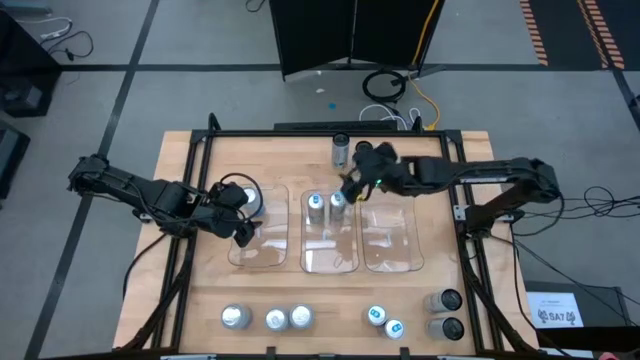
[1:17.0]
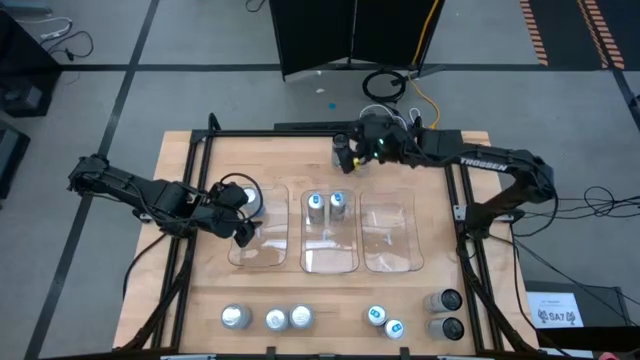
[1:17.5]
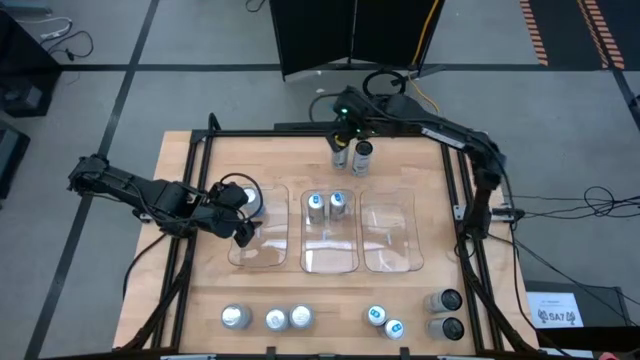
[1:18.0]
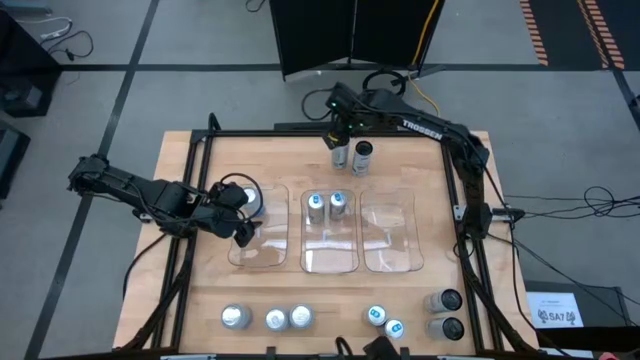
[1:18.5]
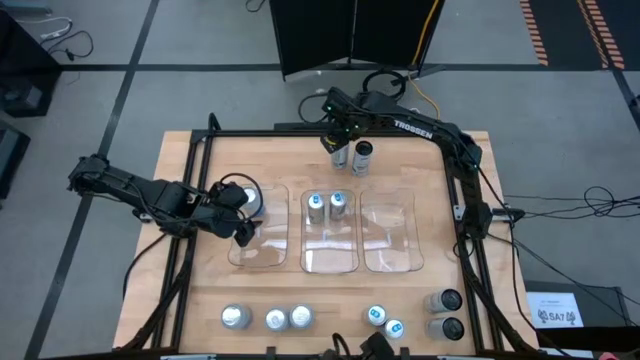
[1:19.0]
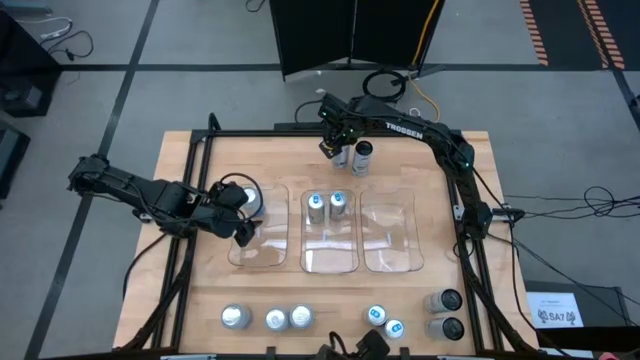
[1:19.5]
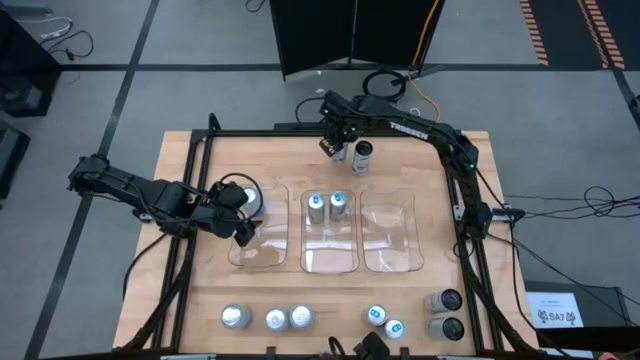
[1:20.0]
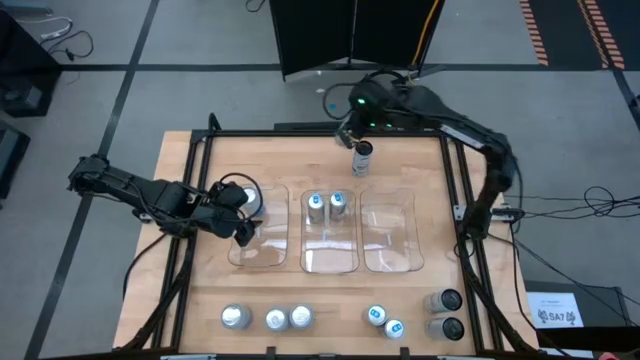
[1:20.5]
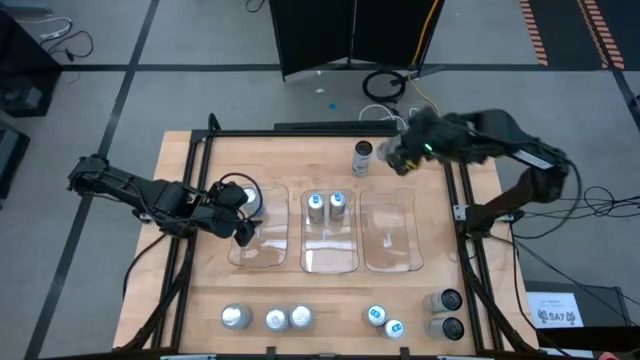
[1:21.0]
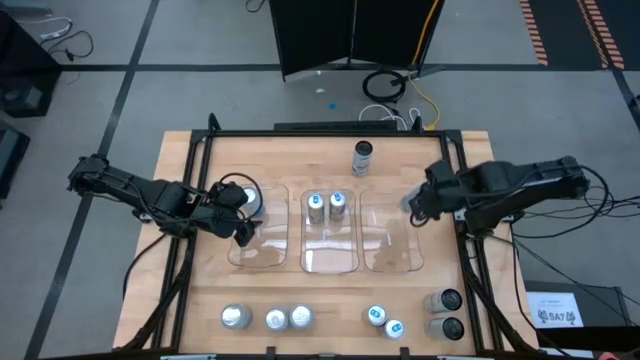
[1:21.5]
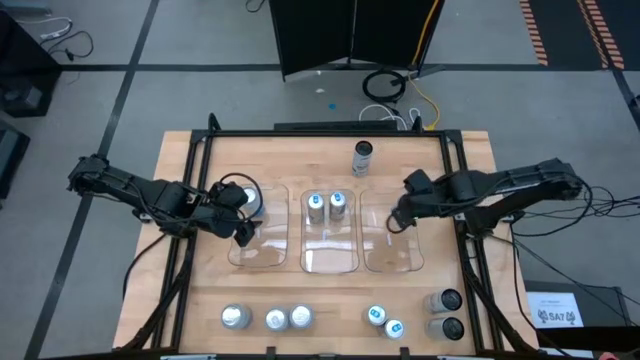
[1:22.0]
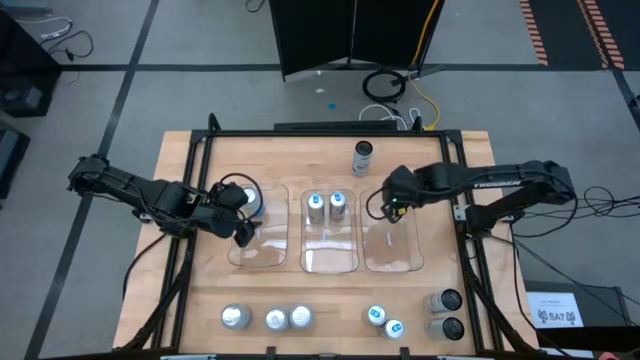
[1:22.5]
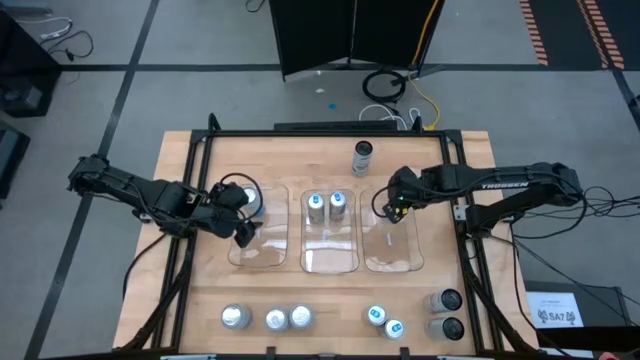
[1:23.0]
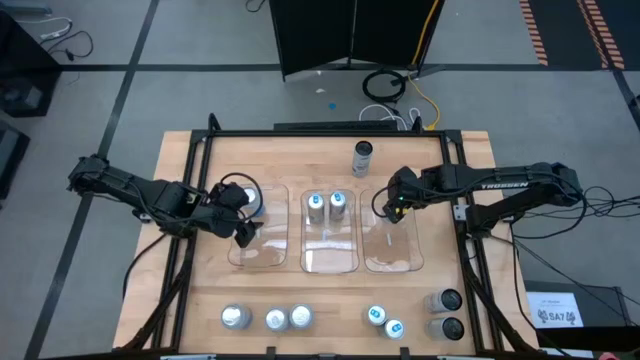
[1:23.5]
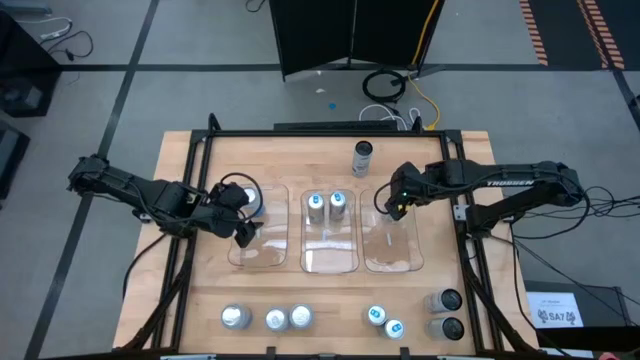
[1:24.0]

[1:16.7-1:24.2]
Task: Sort soda cans
Put the top white-blue soda can into the right transparent bin

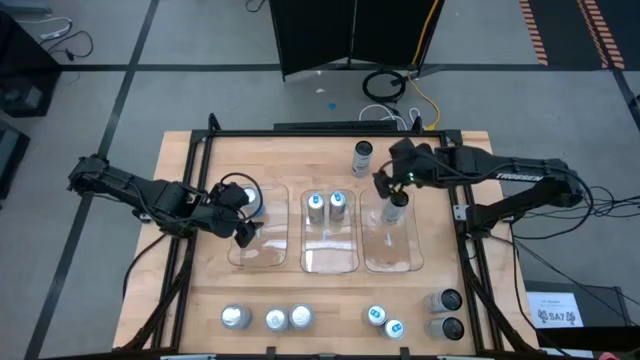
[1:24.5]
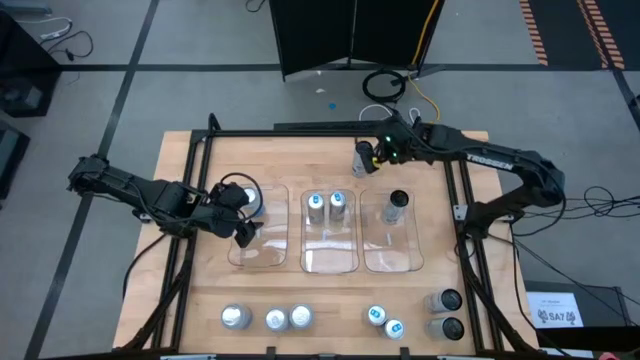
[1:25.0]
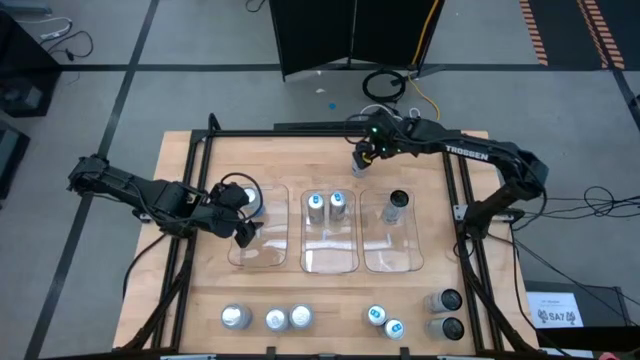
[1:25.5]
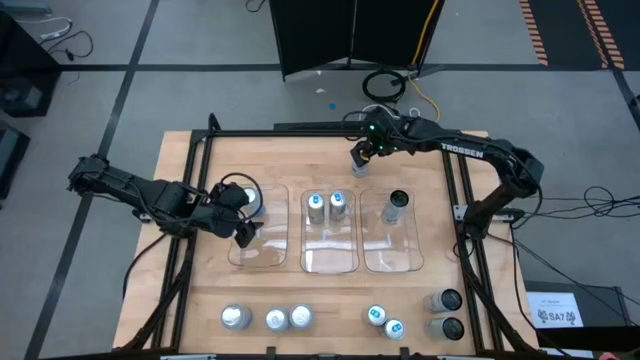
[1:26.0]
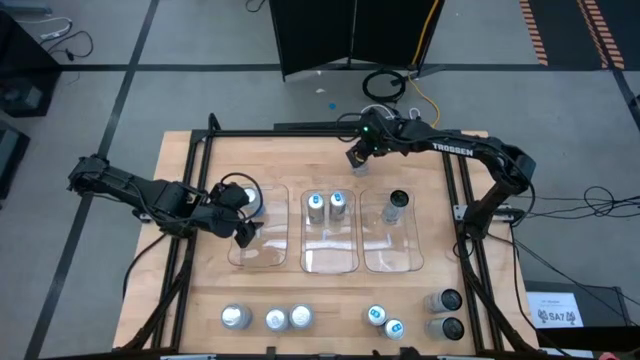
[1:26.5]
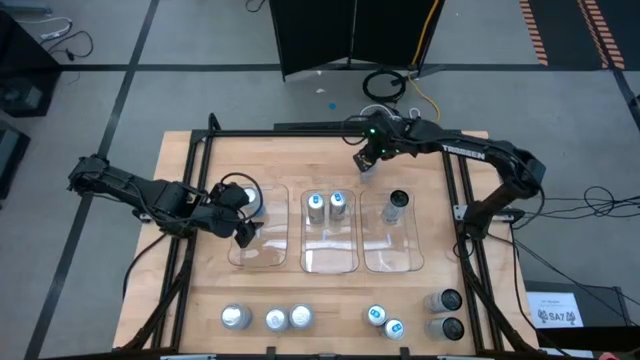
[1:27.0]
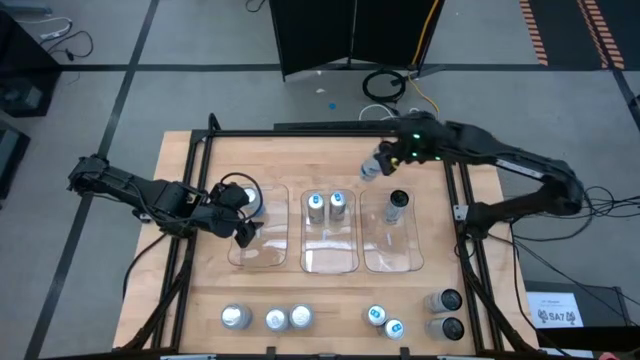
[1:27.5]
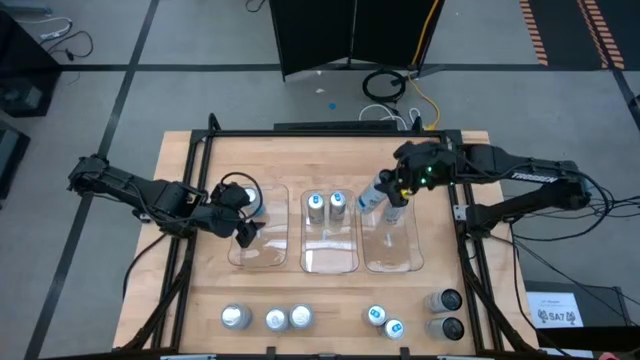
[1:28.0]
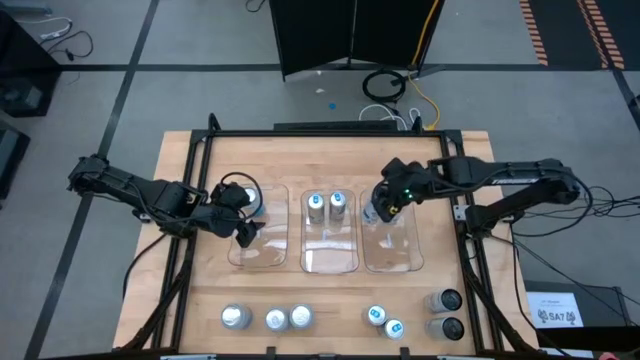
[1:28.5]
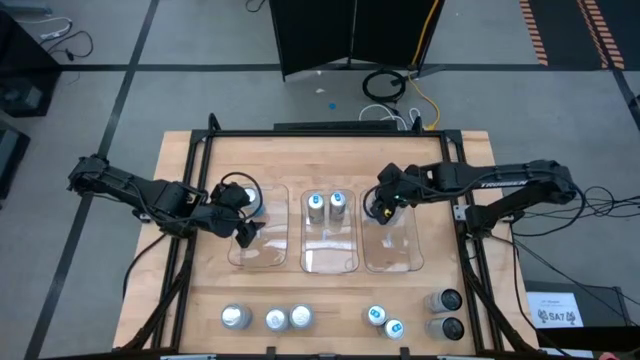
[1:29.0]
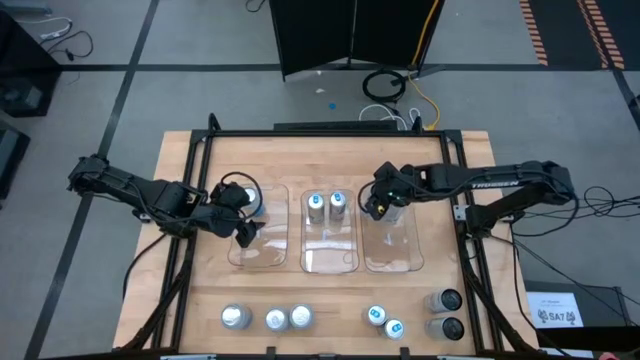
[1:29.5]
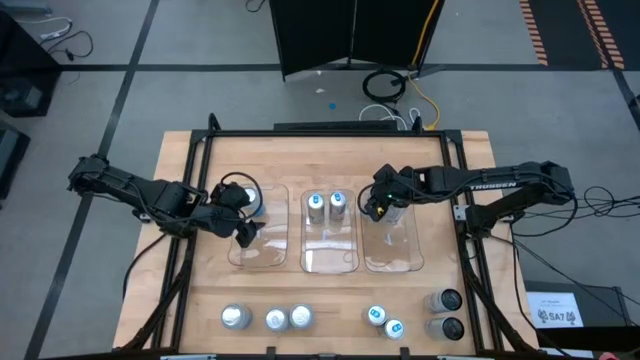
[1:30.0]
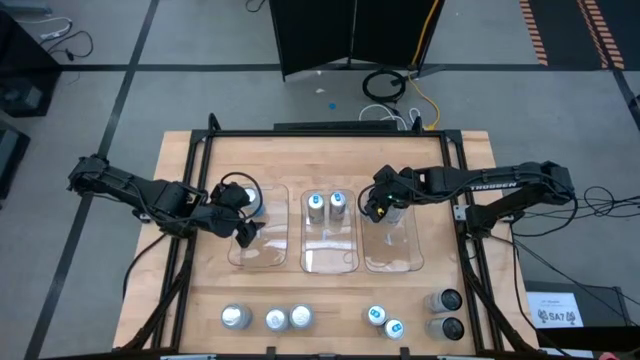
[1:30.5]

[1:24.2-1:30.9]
Put the top white-blue soda can into the right transparent bin

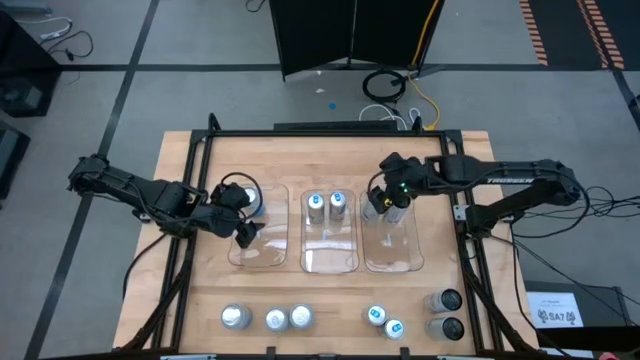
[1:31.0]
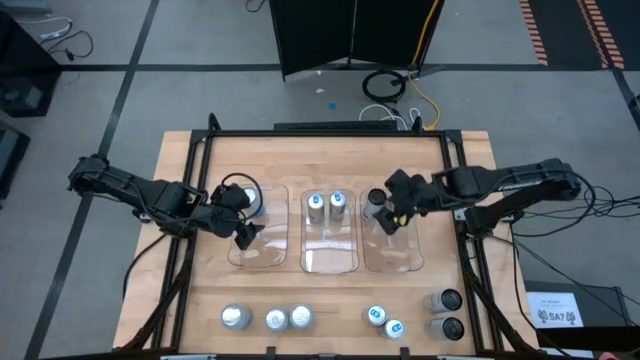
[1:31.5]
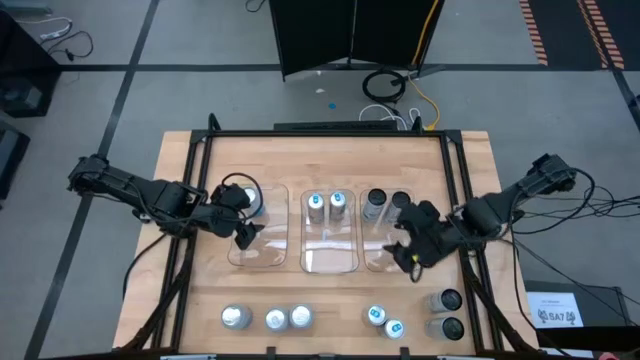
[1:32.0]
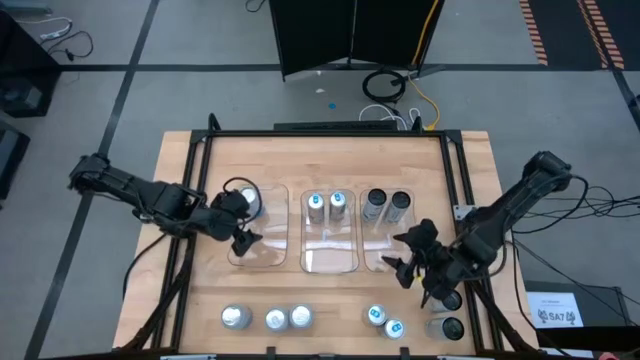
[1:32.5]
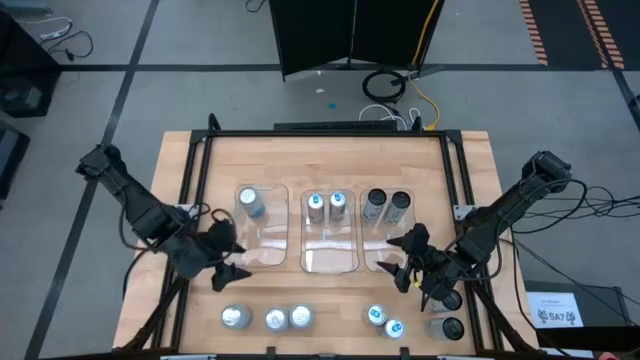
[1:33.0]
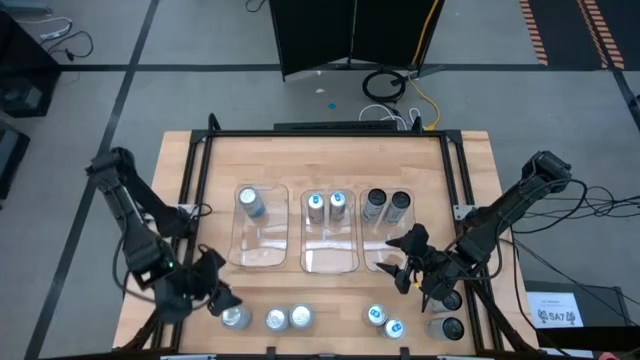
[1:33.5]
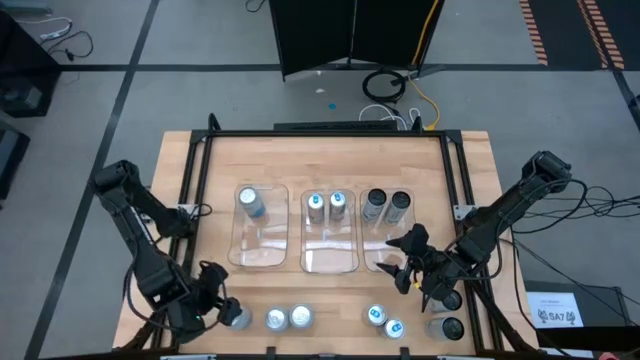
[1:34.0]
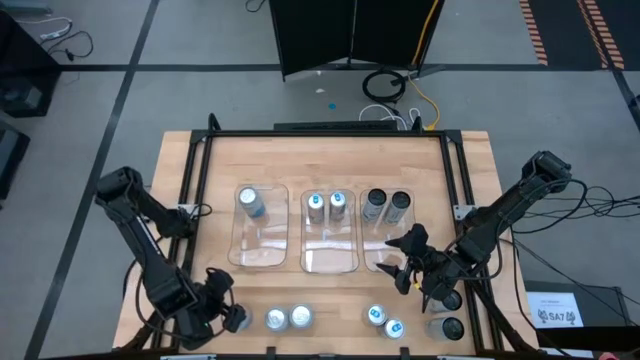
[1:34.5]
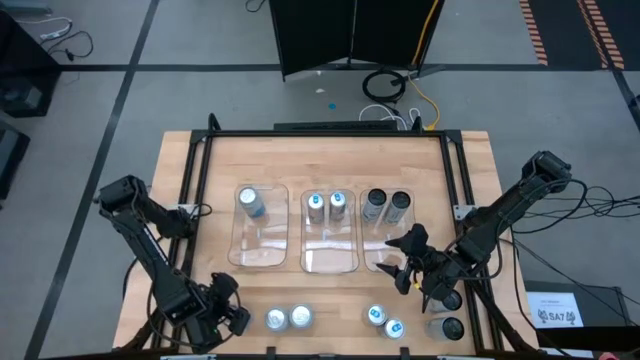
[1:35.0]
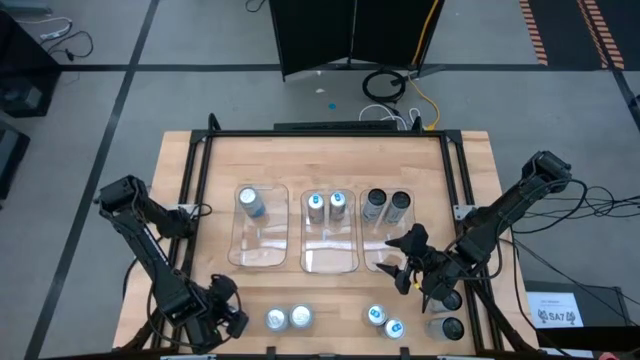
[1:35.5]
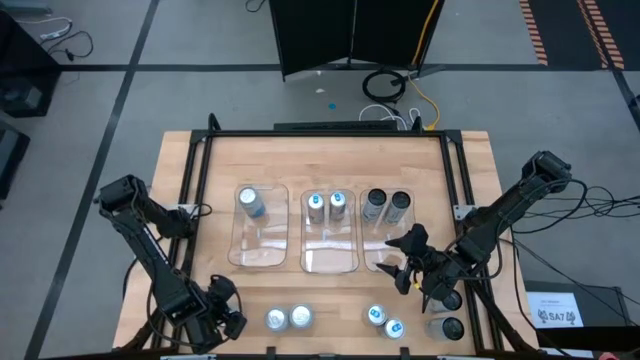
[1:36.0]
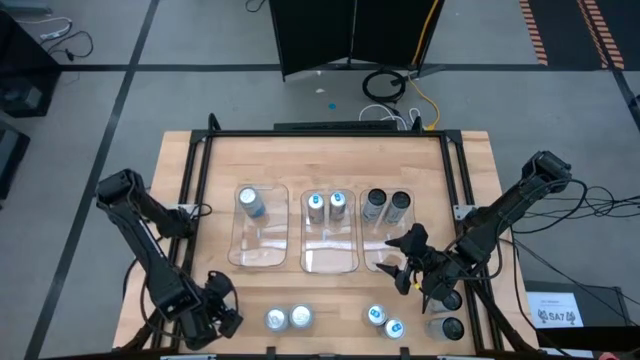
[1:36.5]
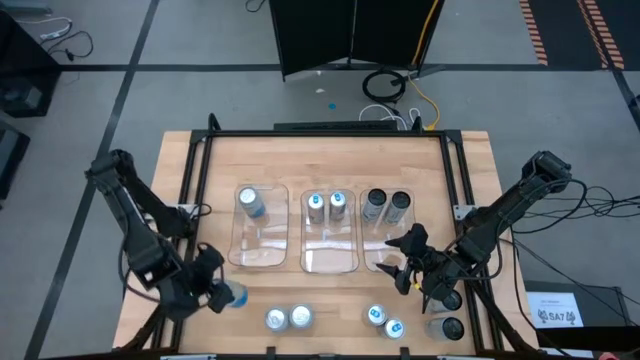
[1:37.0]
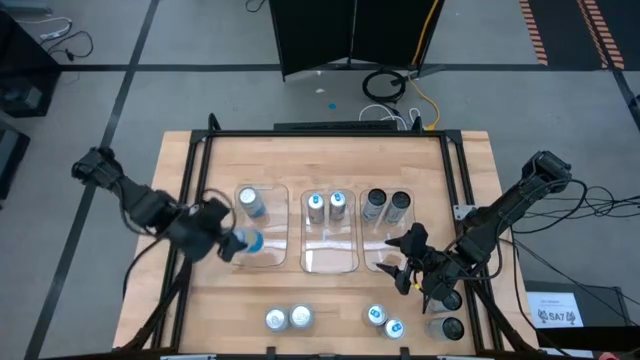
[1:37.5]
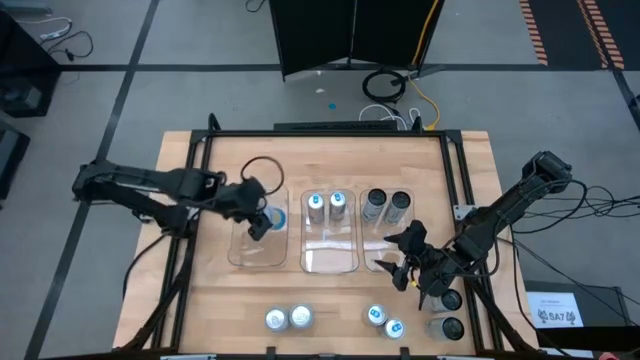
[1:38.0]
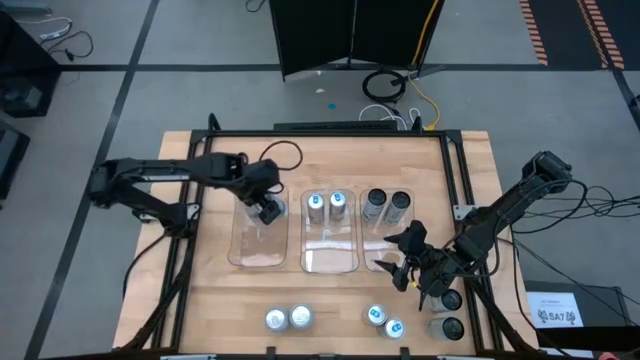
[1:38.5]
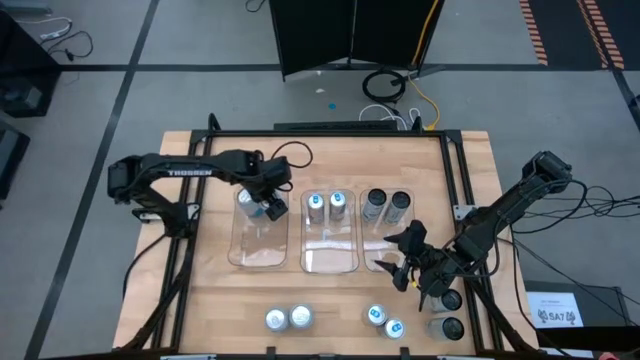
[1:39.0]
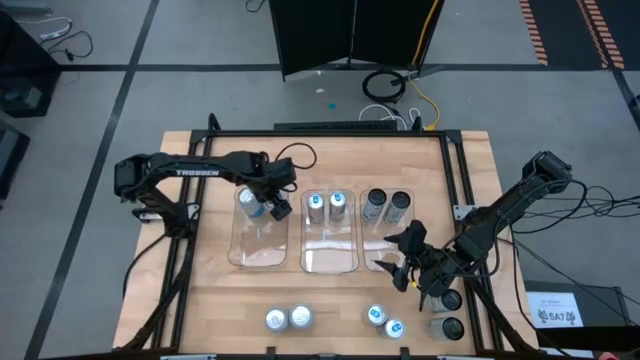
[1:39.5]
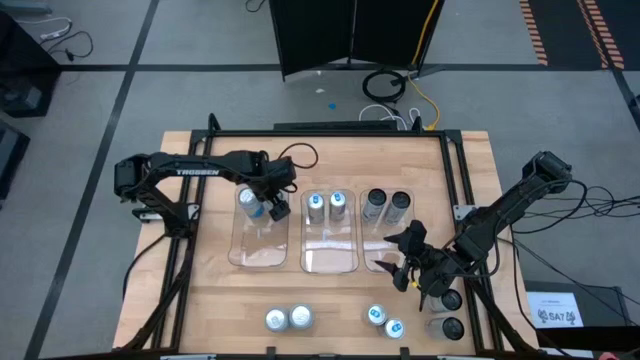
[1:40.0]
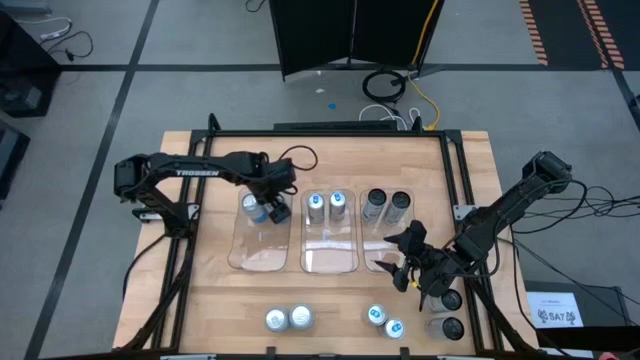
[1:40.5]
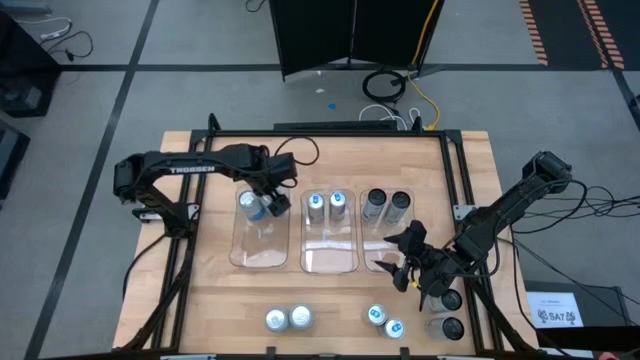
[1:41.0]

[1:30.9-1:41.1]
Put the left blue-white soda can into the left transparent bin
